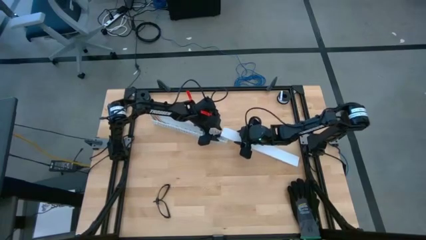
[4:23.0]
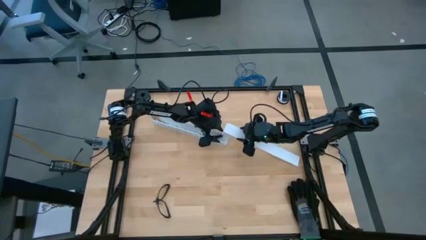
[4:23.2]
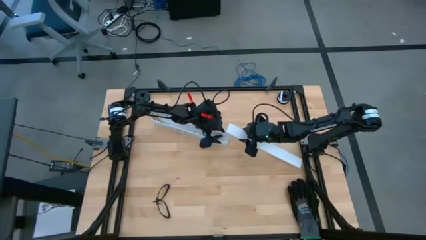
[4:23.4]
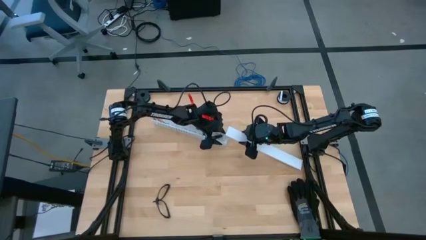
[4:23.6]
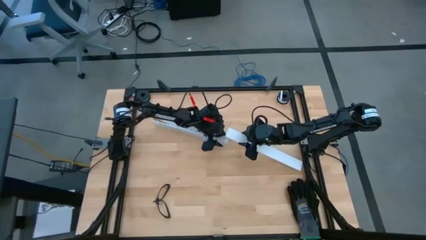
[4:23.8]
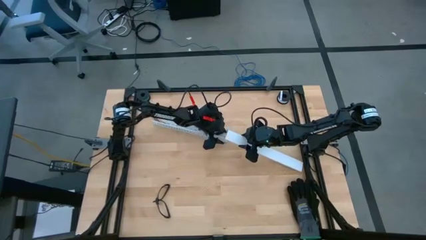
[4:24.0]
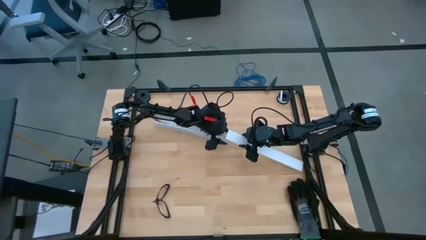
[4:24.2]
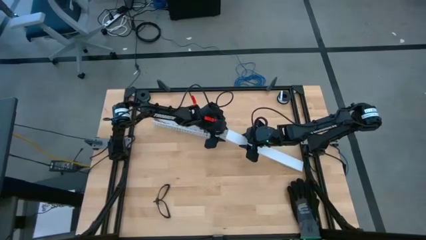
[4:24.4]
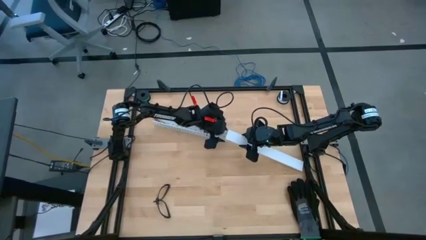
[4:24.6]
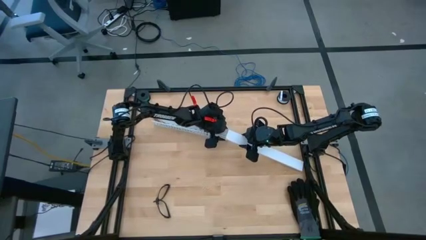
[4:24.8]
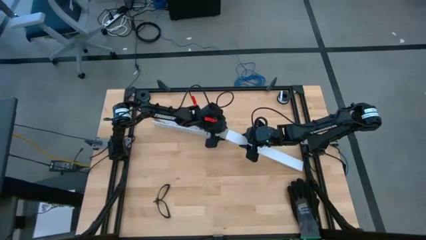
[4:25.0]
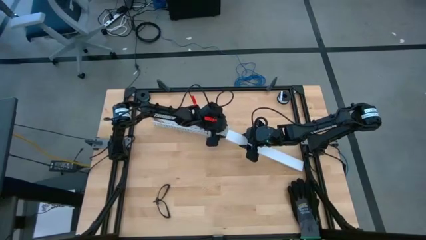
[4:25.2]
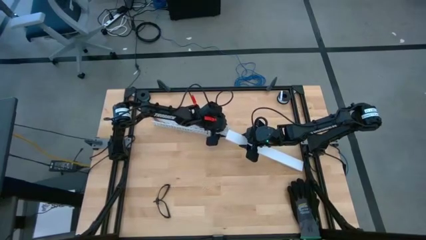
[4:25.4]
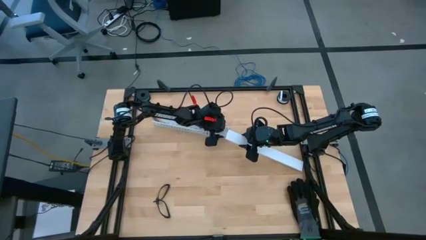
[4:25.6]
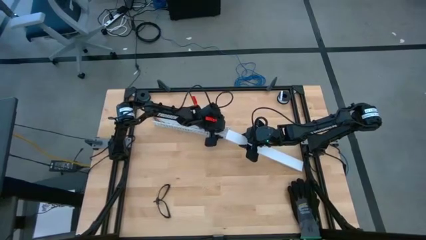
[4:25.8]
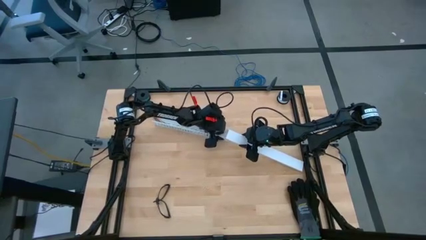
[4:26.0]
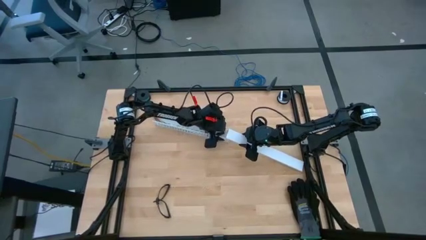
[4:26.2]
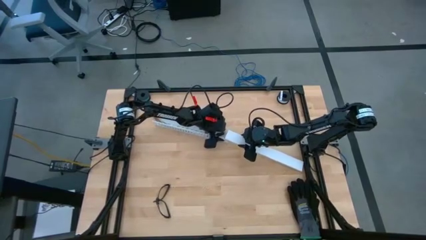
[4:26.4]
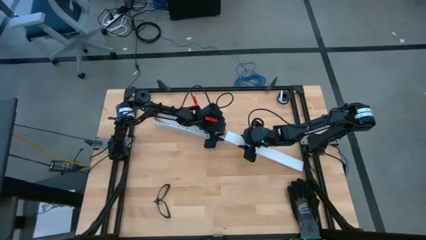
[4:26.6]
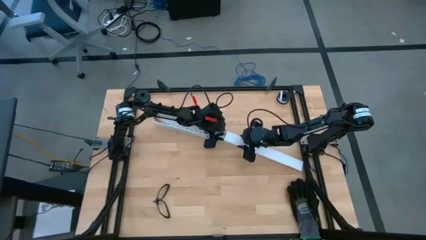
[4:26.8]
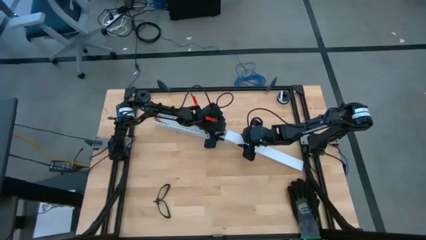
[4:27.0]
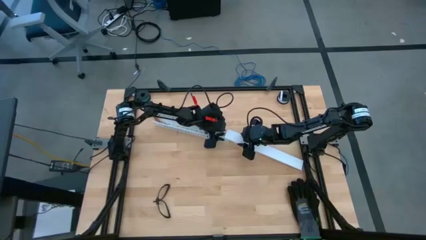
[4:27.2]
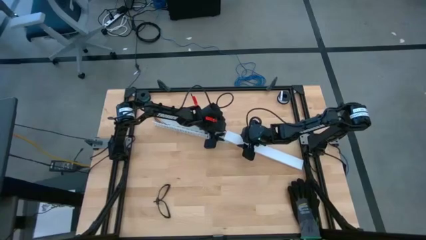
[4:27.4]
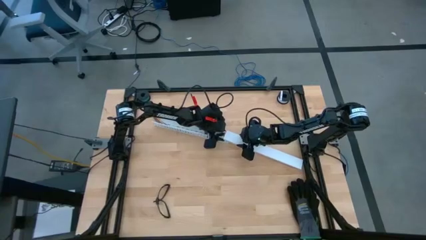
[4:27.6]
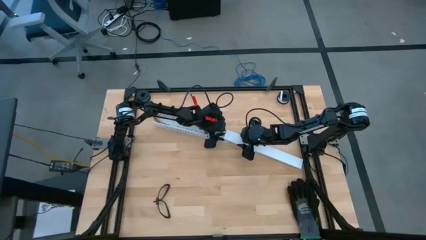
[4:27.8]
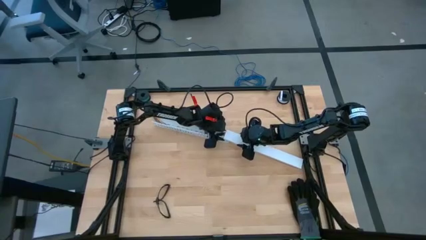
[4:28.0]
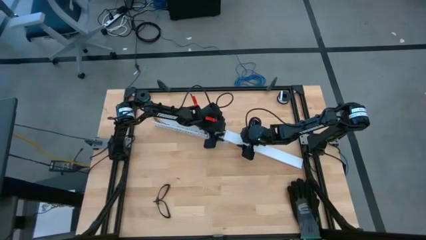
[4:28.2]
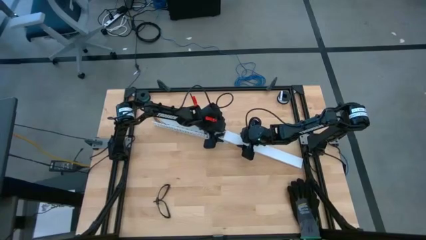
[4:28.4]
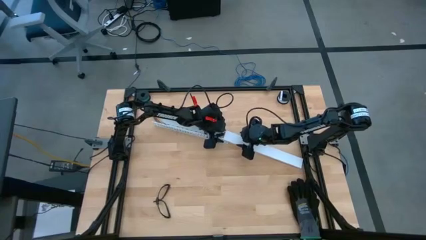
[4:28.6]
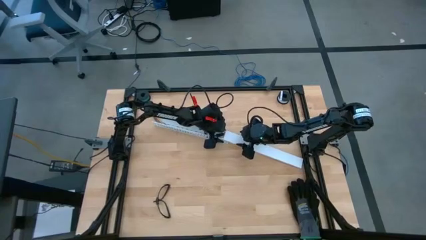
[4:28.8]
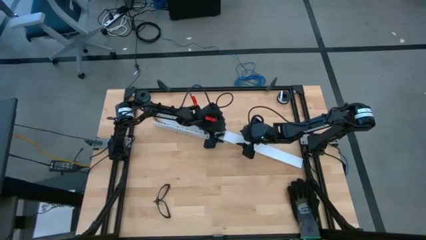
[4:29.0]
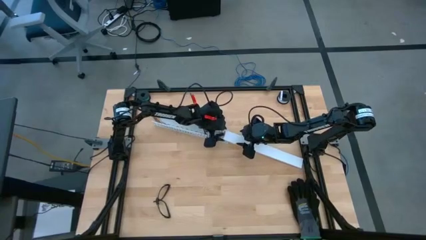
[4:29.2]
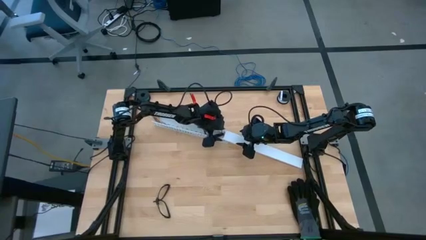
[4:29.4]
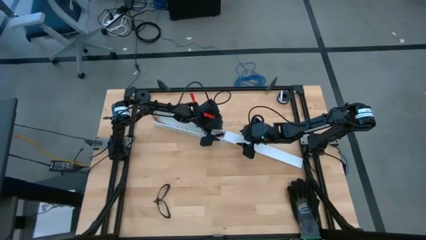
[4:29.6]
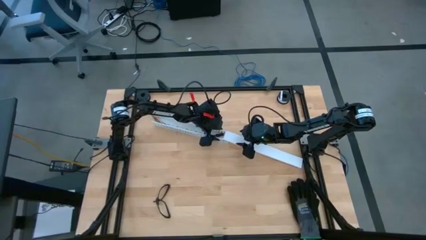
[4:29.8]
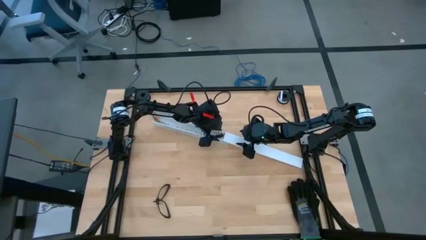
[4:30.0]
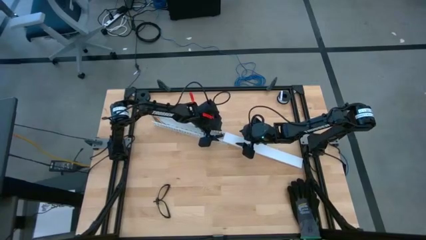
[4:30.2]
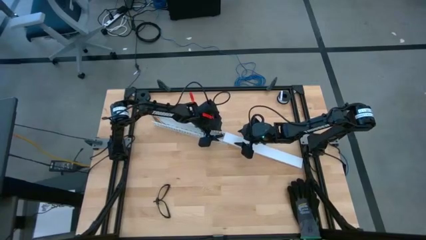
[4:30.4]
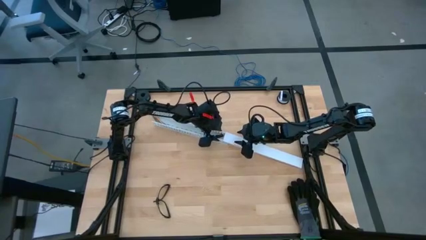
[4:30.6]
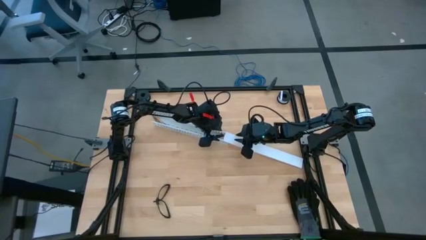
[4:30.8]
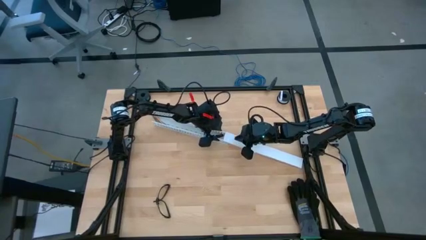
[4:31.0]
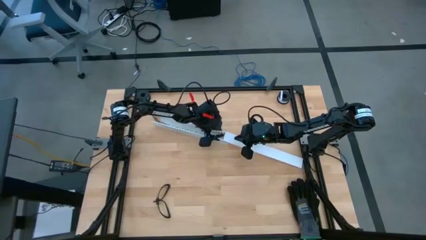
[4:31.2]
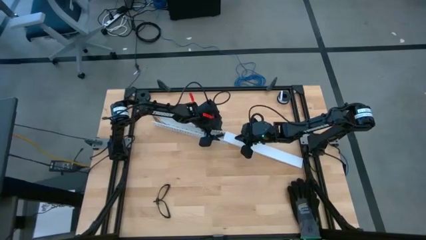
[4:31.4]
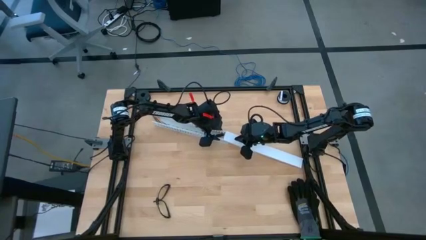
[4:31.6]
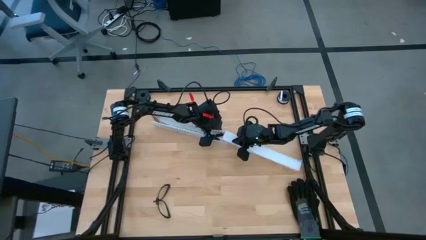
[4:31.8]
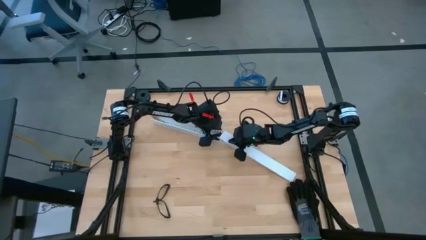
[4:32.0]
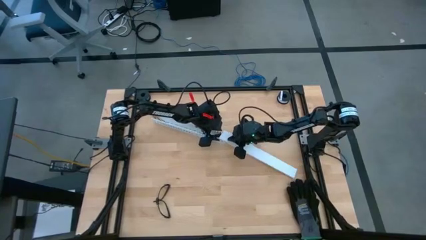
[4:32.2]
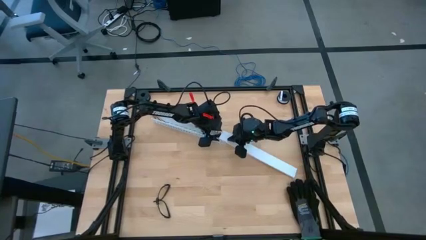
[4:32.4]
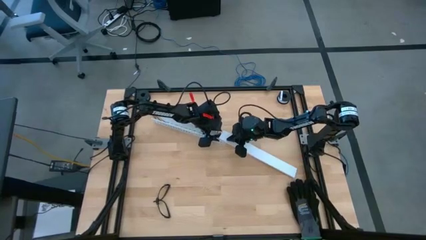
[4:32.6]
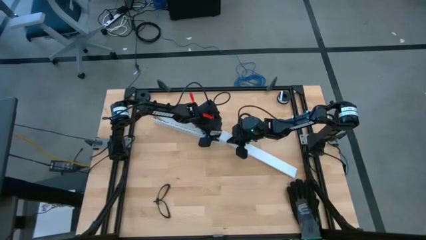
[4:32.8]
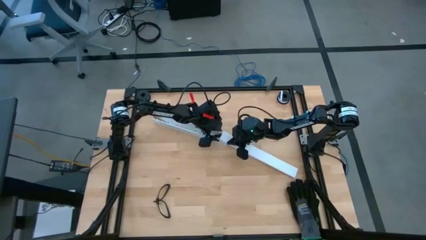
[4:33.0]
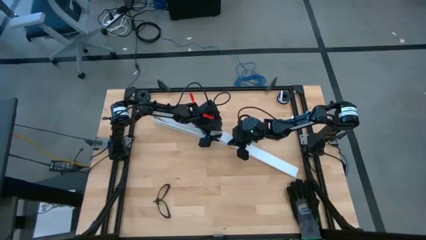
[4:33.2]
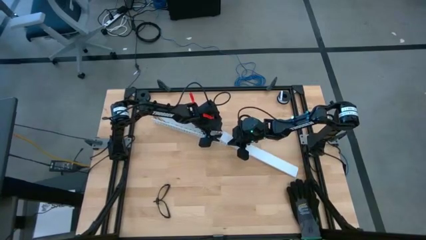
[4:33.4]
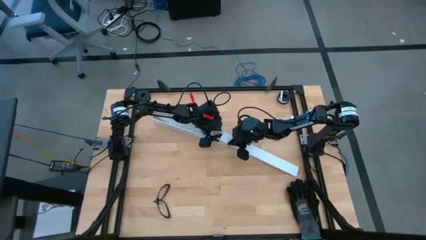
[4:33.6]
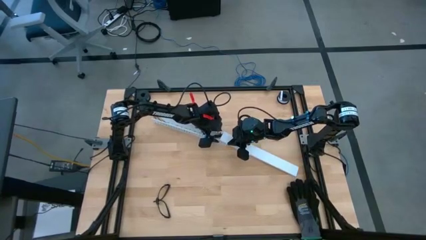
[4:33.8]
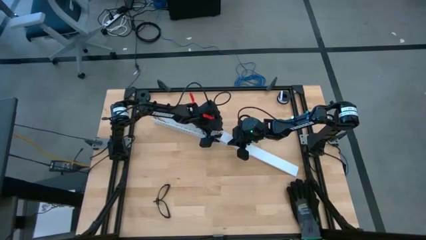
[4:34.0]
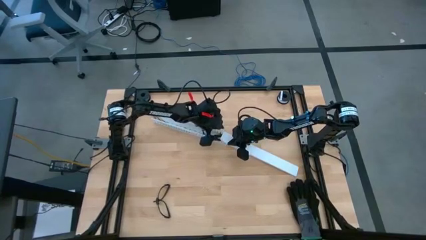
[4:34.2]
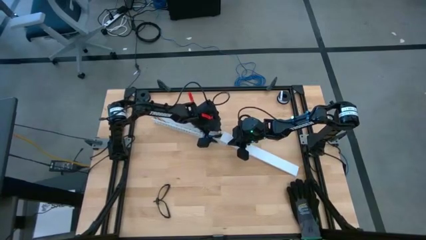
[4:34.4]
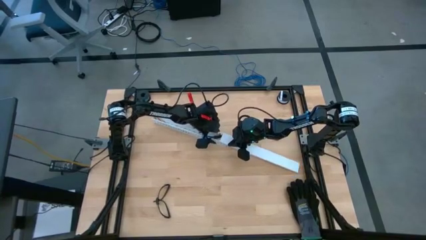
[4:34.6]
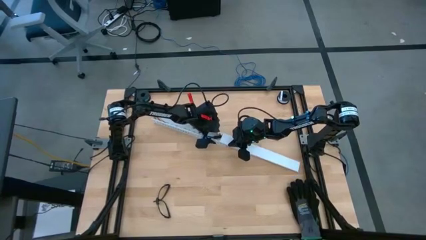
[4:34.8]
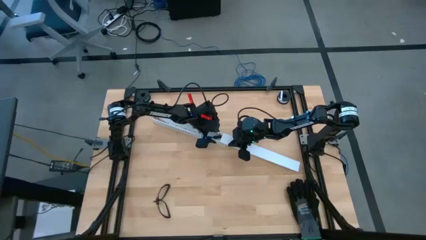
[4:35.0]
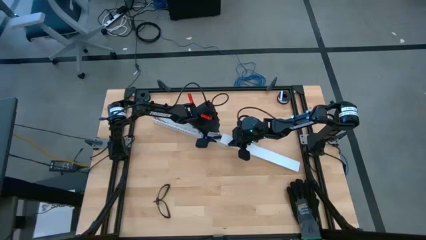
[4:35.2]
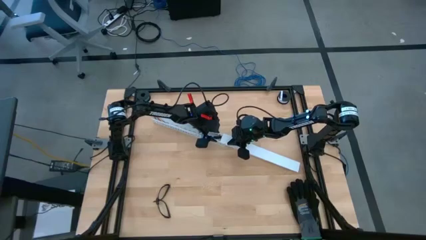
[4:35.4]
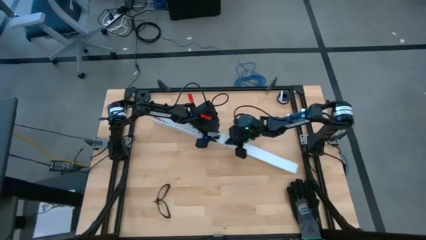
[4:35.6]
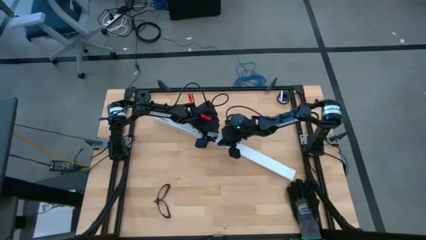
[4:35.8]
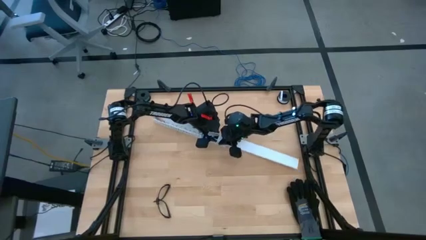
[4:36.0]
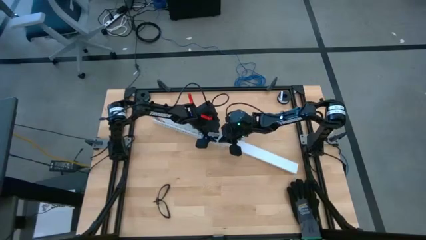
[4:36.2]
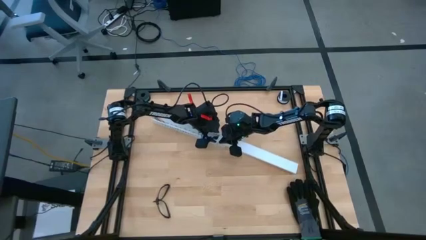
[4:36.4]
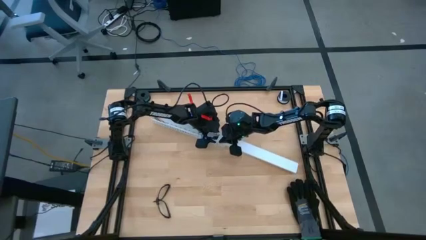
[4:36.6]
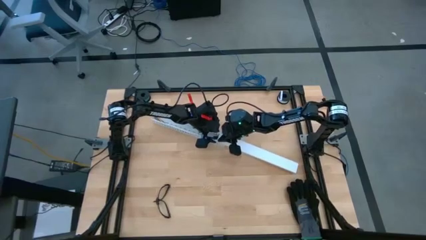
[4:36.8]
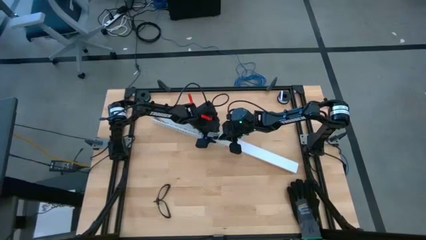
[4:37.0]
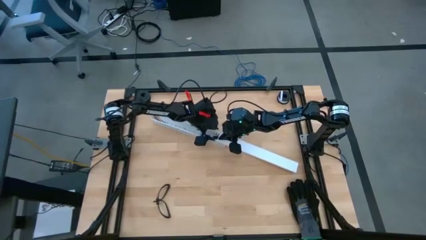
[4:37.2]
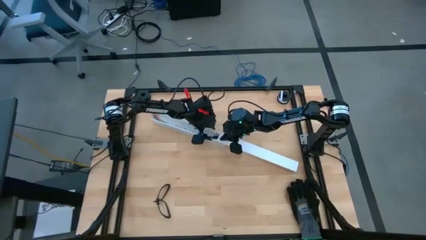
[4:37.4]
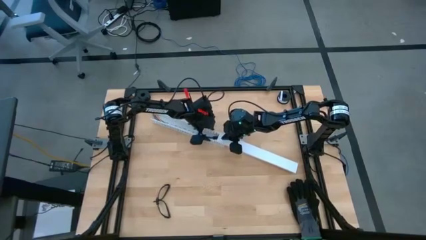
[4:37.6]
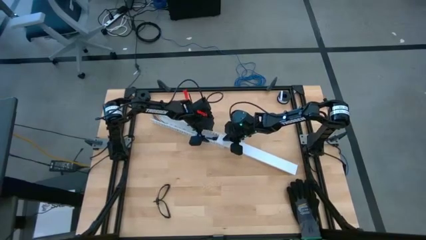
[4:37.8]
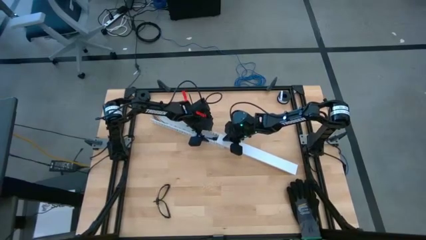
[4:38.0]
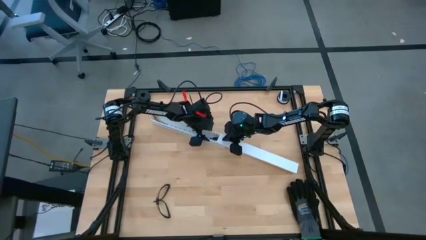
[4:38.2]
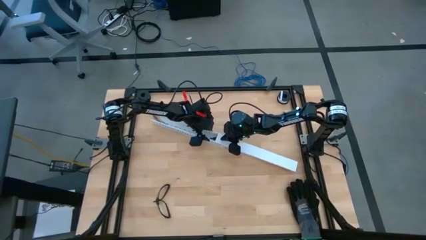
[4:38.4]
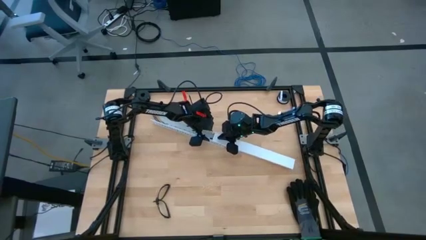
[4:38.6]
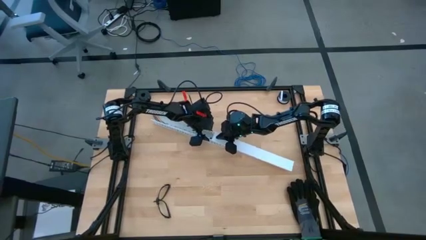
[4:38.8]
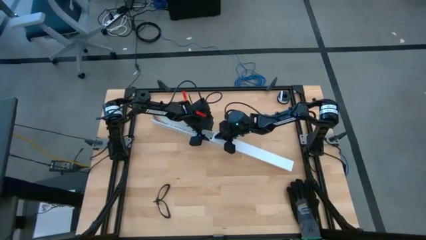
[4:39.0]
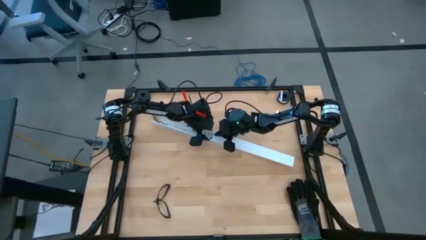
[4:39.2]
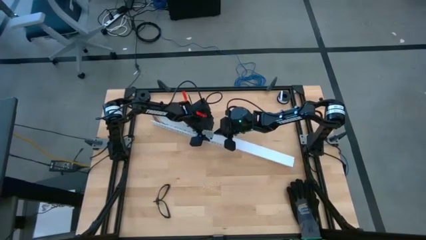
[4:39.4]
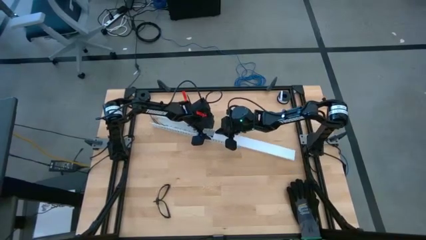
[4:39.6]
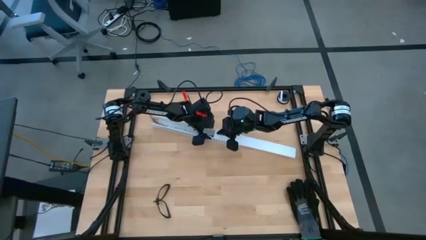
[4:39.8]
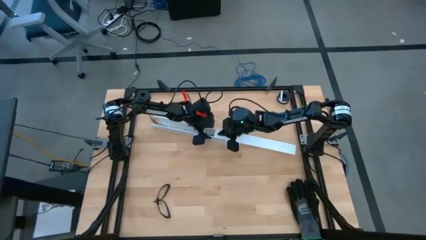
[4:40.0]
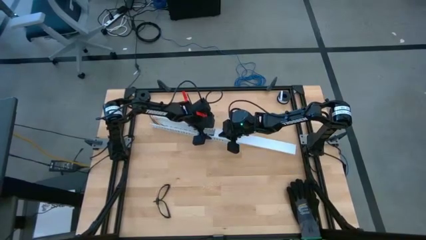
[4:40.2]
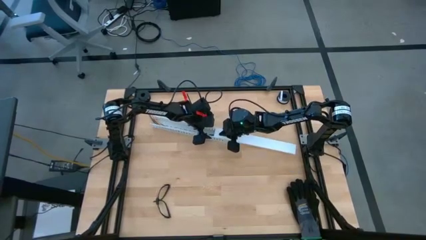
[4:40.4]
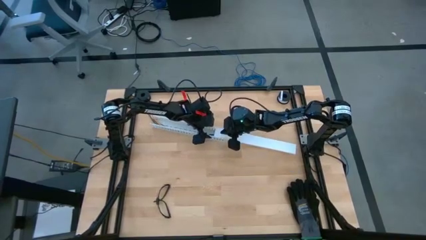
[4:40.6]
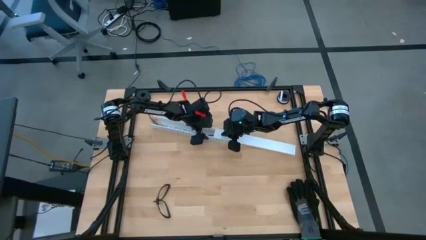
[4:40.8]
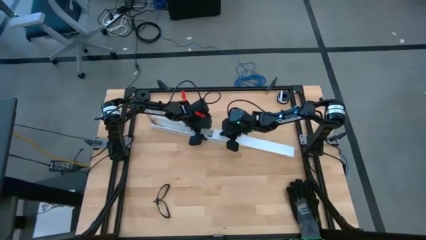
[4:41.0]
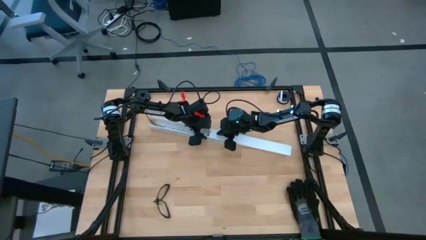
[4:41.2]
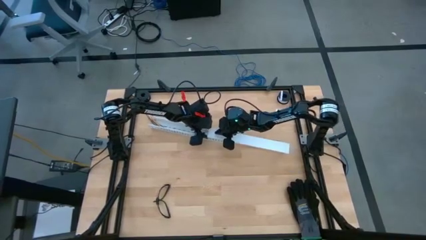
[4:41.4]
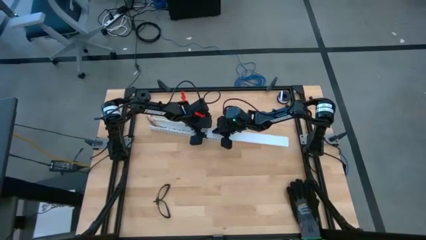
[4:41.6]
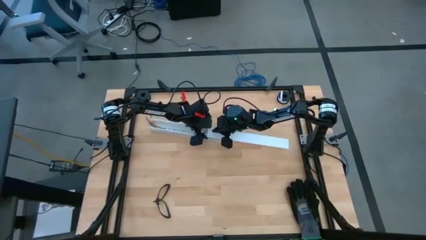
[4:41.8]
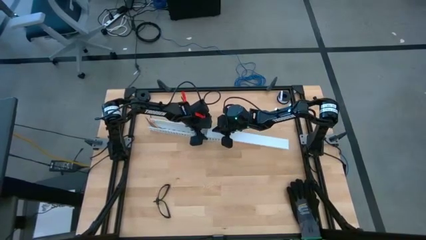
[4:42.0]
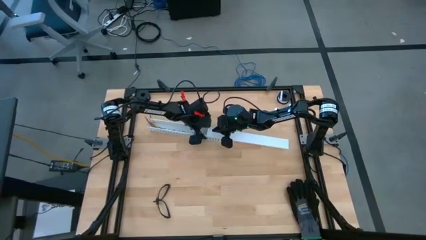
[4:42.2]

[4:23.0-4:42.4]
Task: Ziptie cables
Close the white cable duct lid
